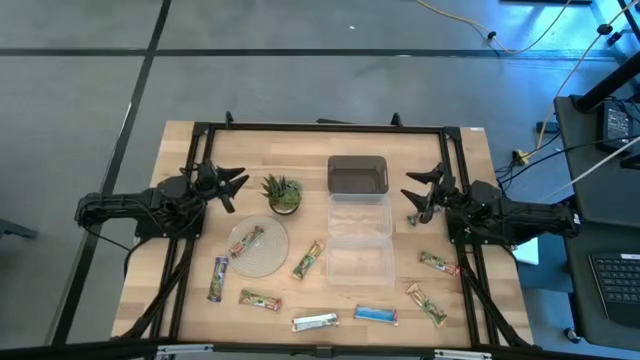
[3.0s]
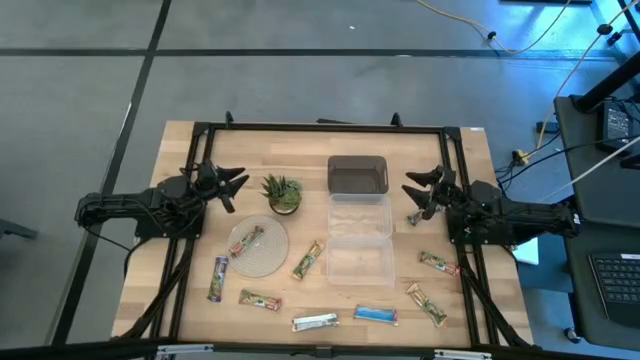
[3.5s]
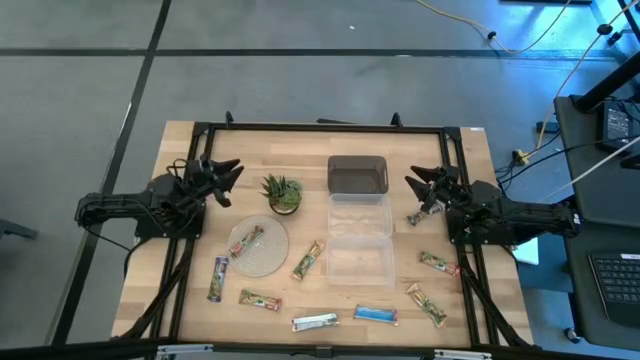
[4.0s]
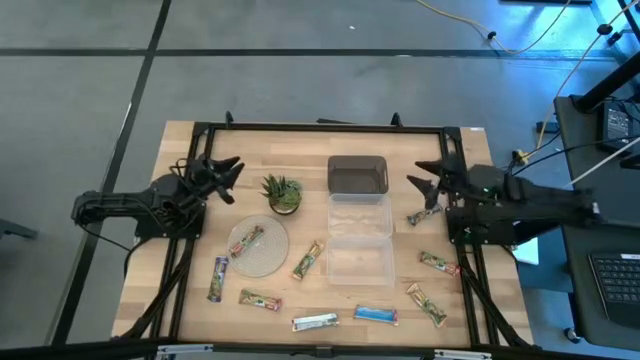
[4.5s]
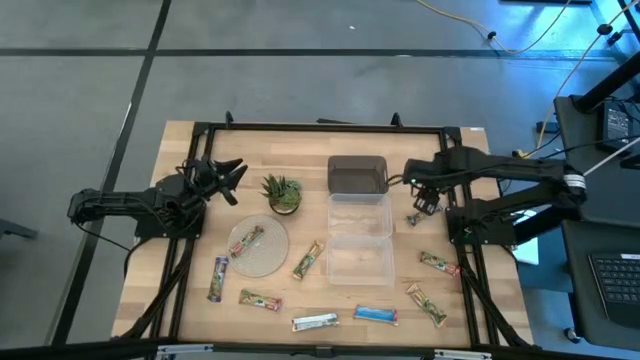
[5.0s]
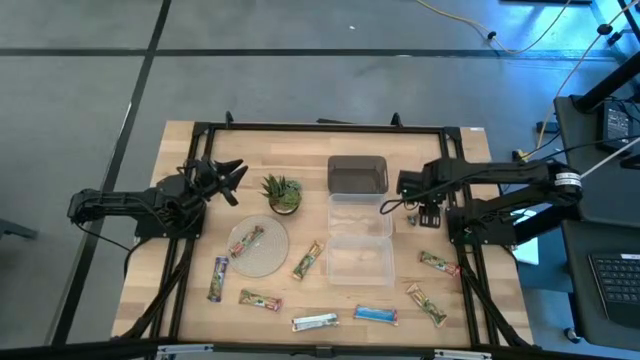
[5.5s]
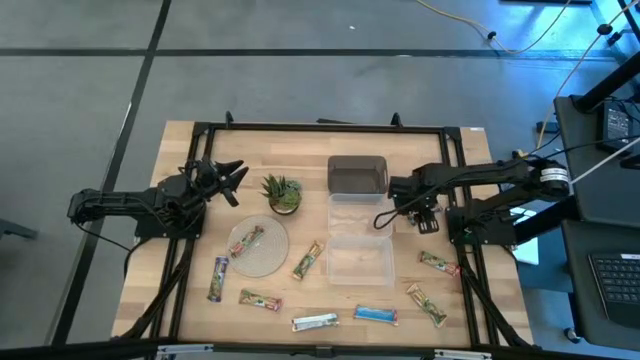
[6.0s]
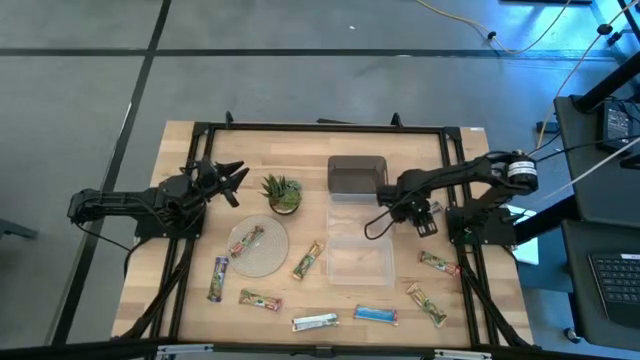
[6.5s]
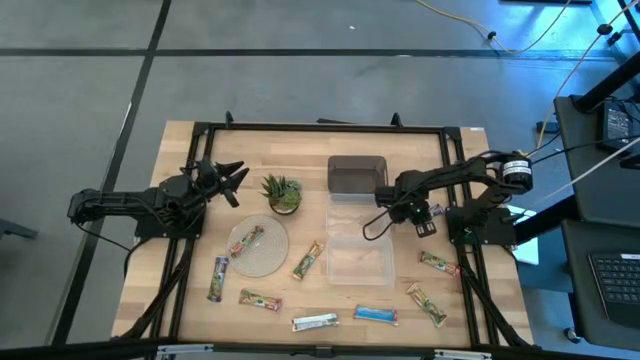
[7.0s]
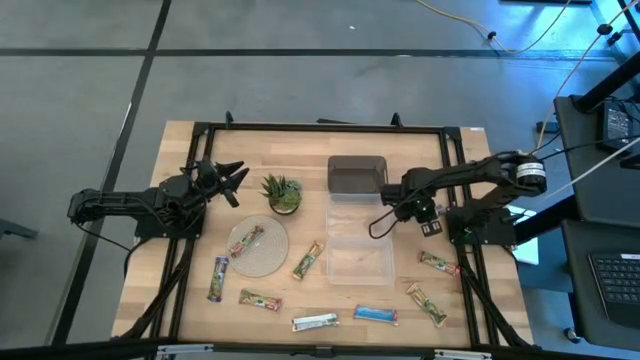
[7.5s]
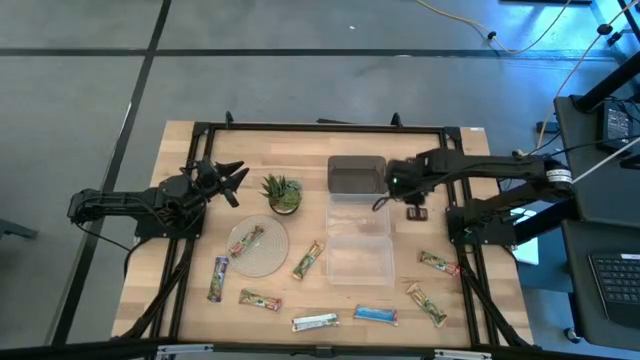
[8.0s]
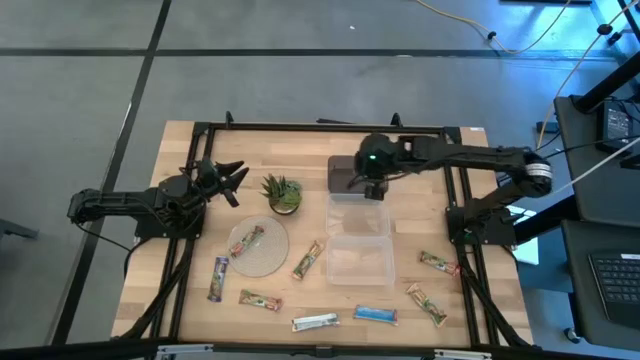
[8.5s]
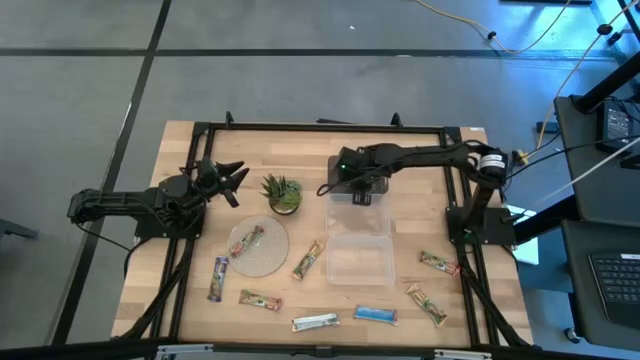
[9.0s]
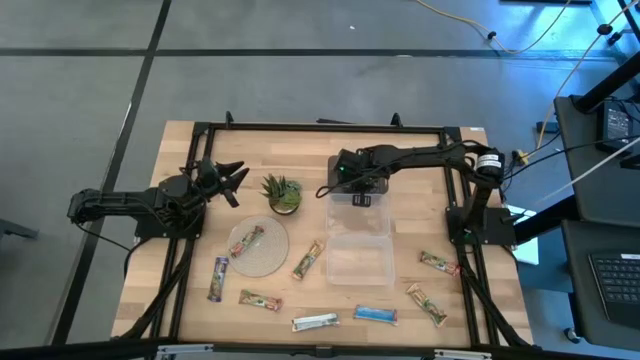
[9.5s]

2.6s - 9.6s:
Task: Pick and place Granola Bars by type
Put the blue granola bar into the black bin

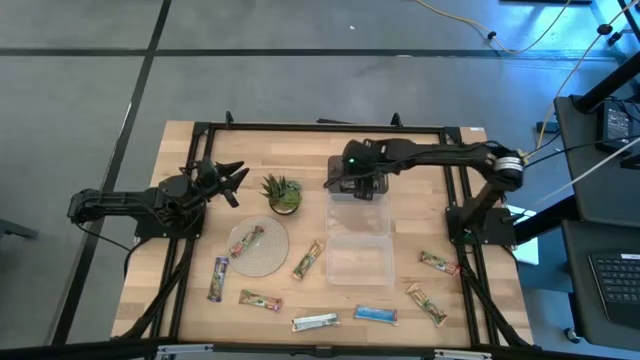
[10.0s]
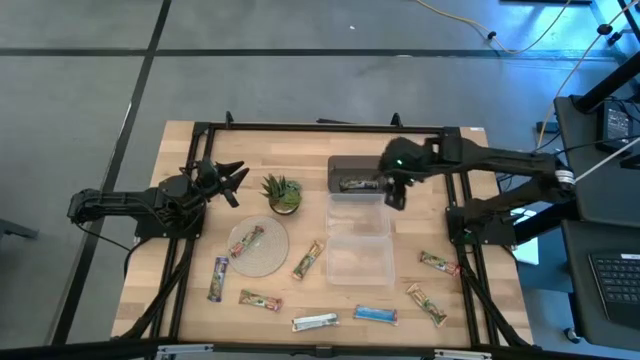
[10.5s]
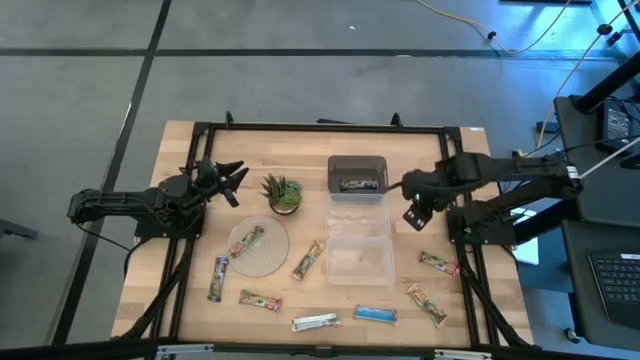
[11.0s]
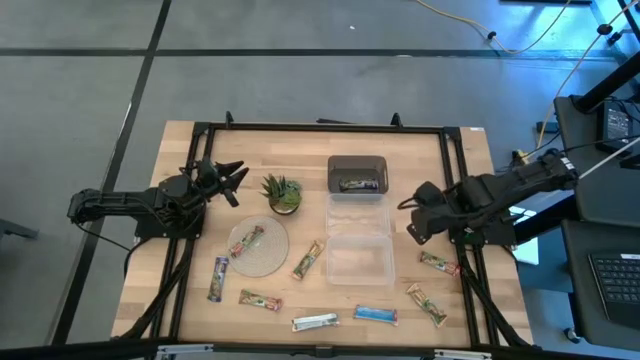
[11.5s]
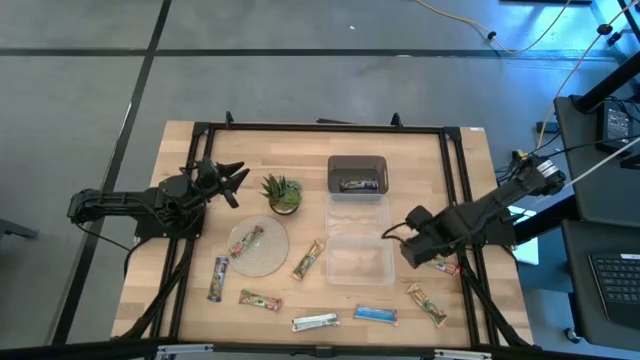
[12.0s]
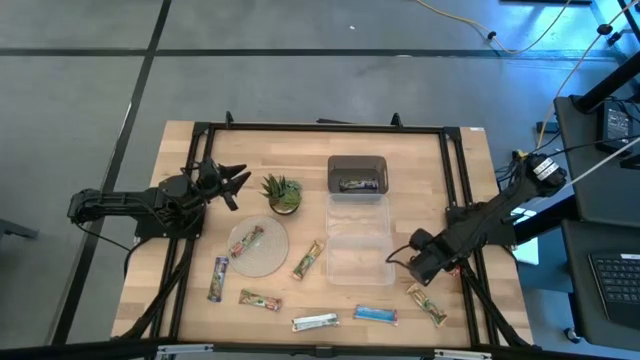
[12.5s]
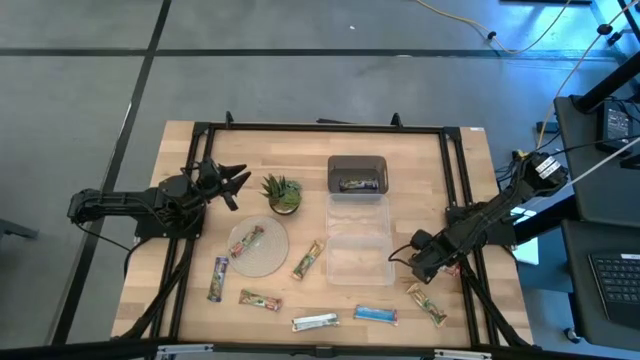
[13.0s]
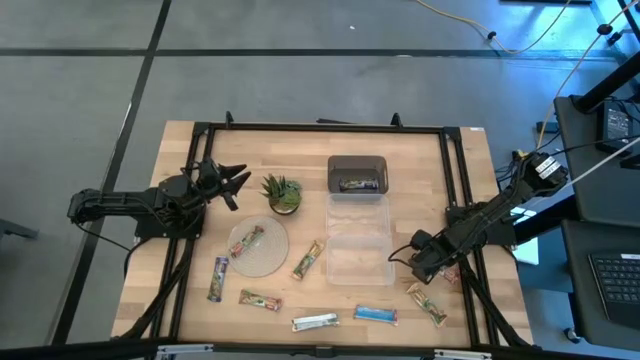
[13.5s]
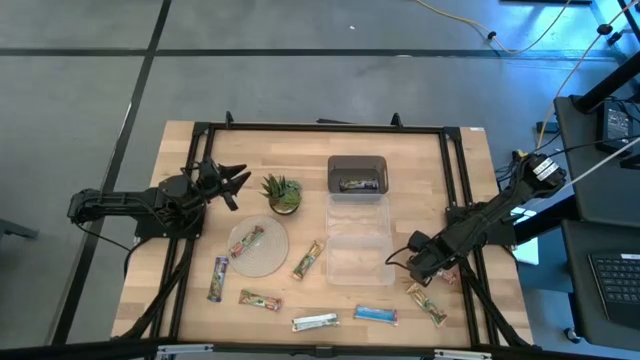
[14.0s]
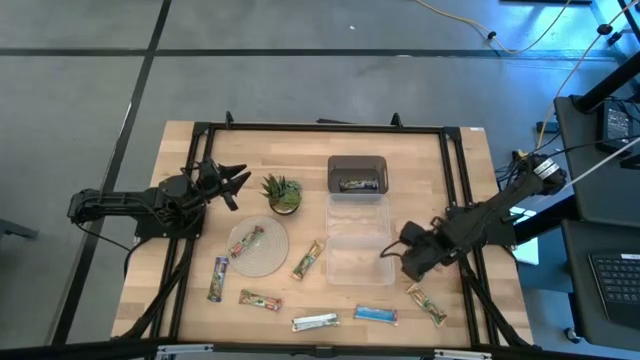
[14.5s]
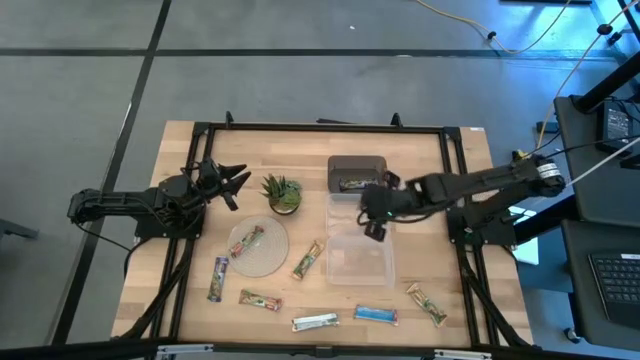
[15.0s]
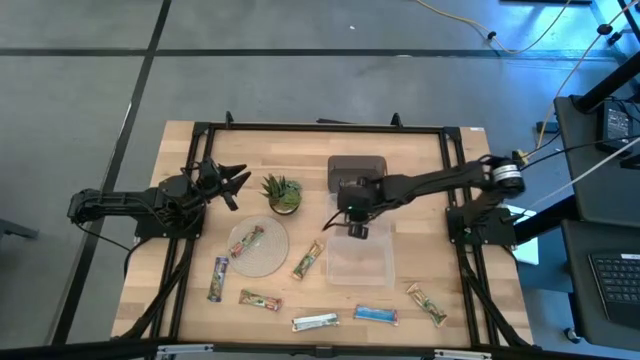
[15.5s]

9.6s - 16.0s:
Put the red granola bar into the top transparent bin

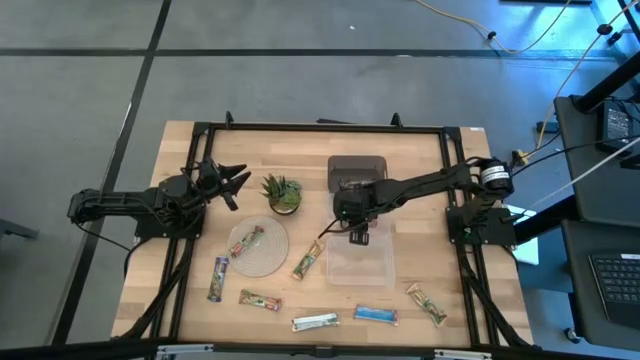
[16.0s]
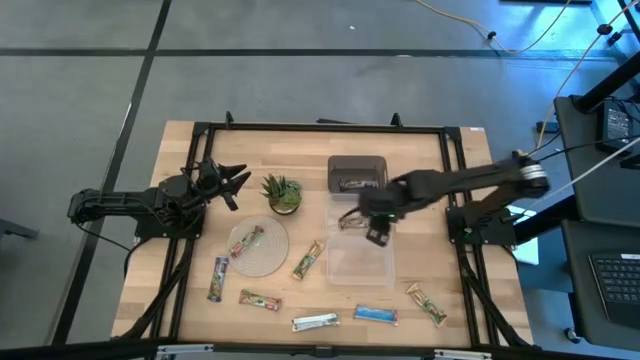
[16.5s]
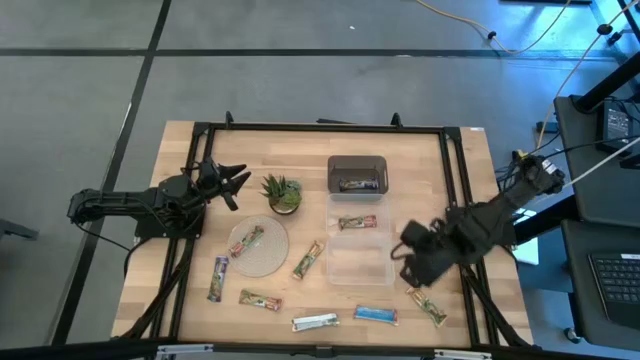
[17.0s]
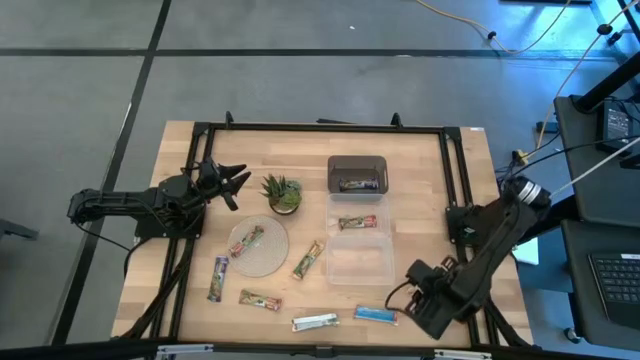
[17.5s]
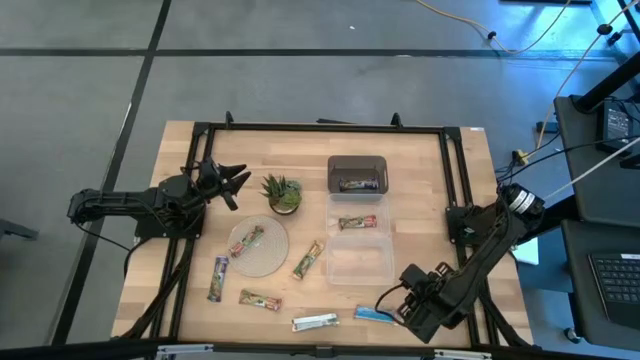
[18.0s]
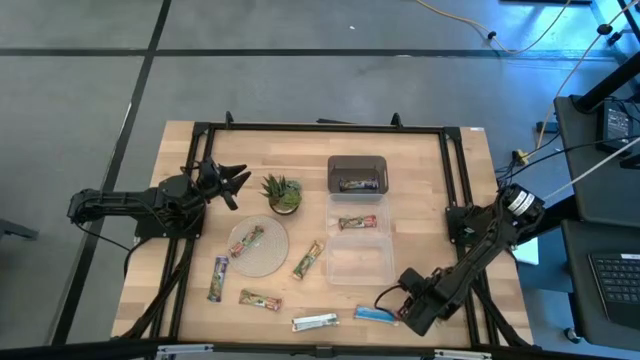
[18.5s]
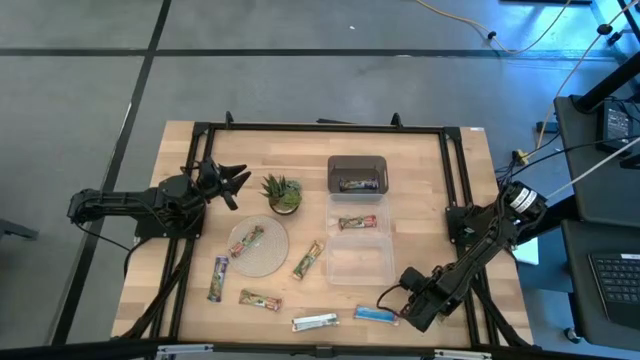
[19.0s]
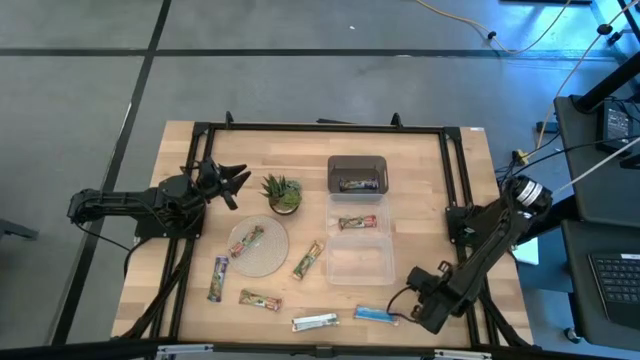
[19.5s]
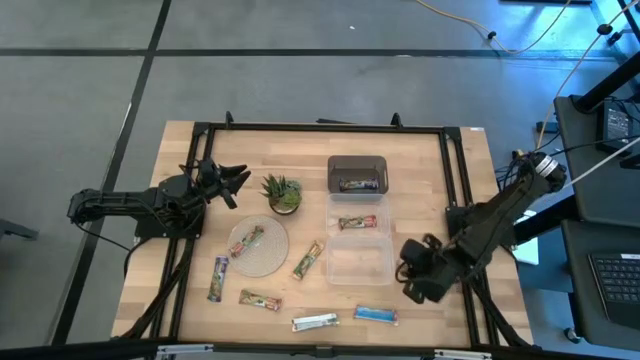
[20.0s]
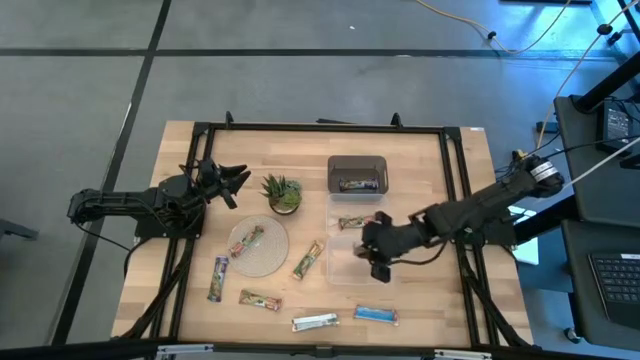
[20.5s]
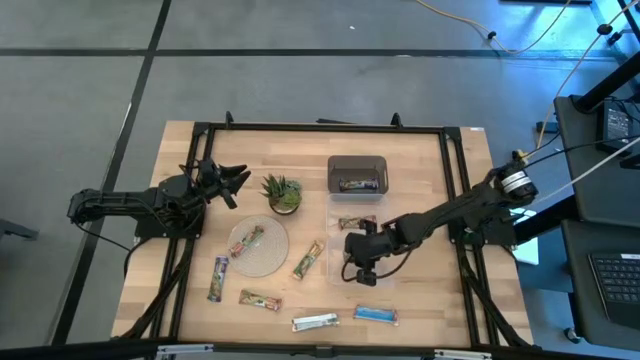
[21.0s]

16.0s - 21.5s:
Put the yellow granola bar into the bottom transparent bin

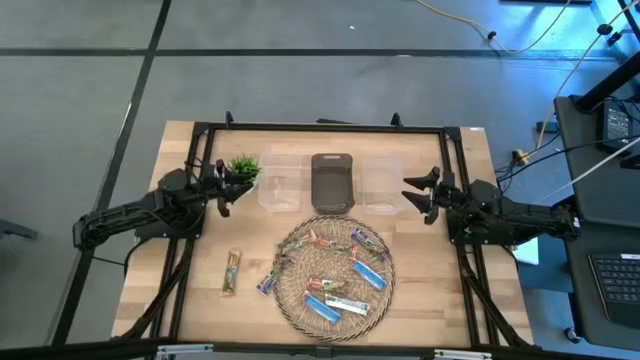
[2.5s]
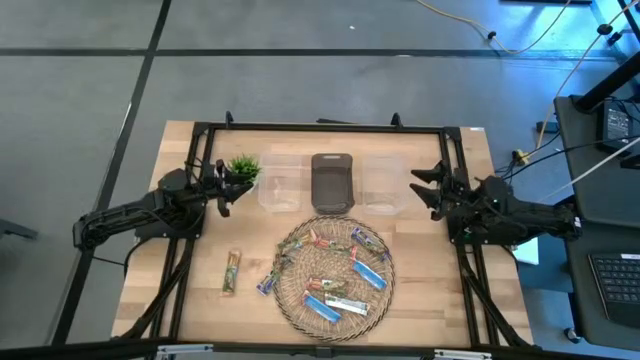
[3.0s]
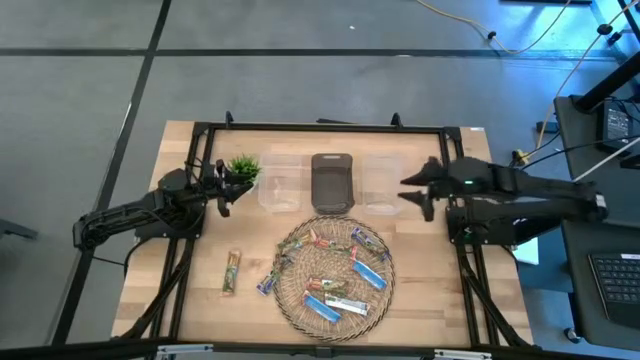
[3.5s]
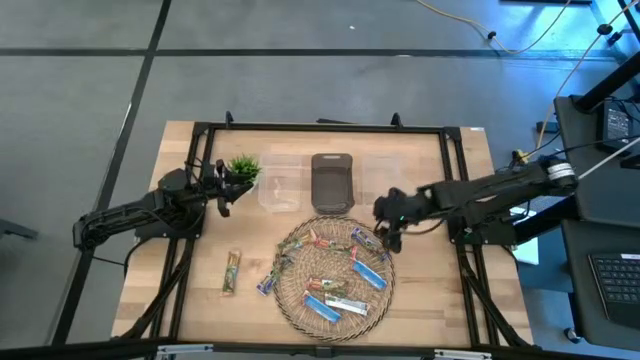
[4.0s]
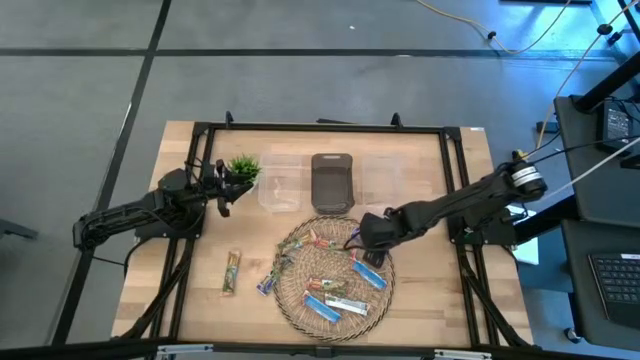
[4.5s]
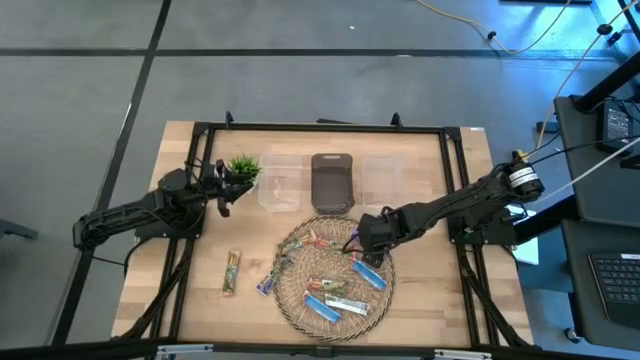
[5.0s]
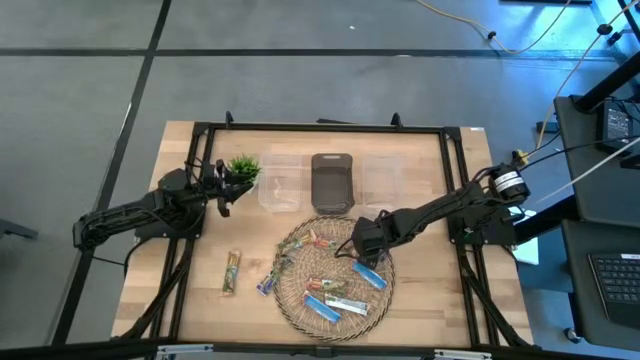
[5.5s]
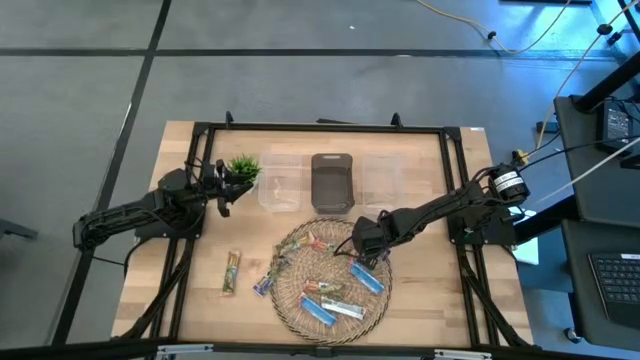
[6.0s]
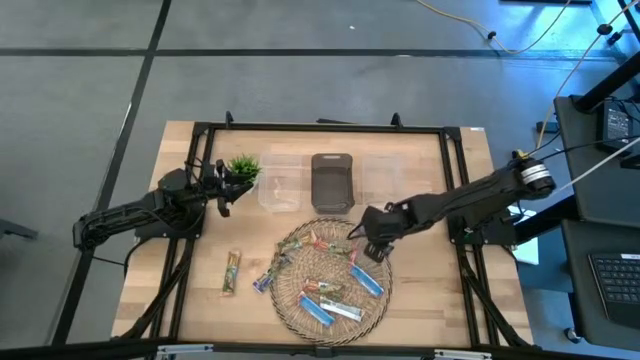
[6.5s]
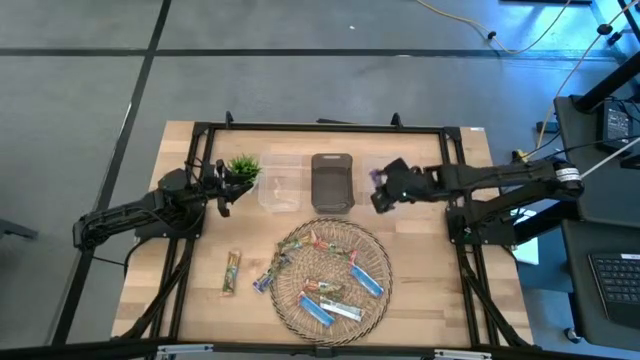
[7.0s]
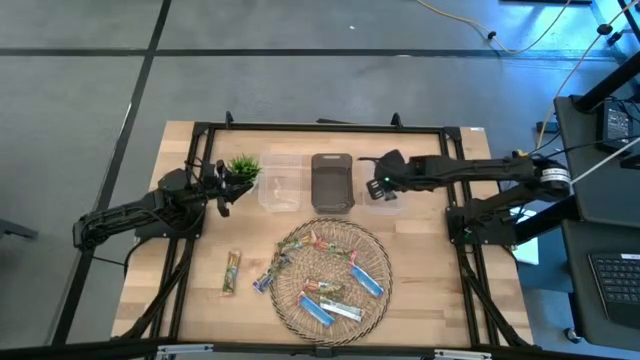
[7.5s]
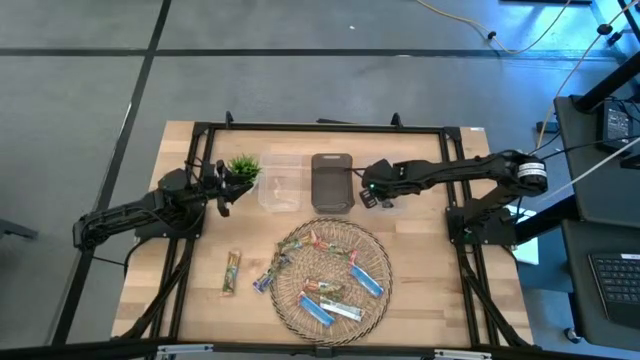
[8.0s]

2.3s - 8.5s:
Task: Pick and place Granola Bars by type
Put the blue granola bar into the right transparent bin
